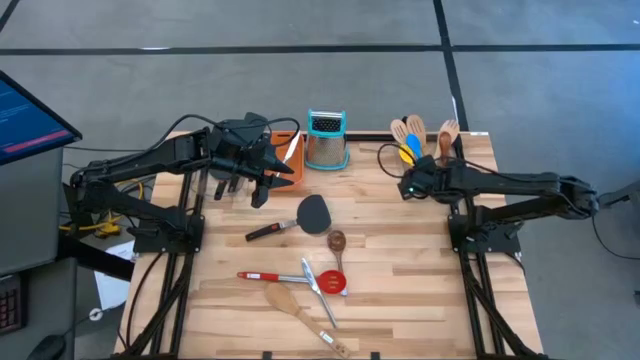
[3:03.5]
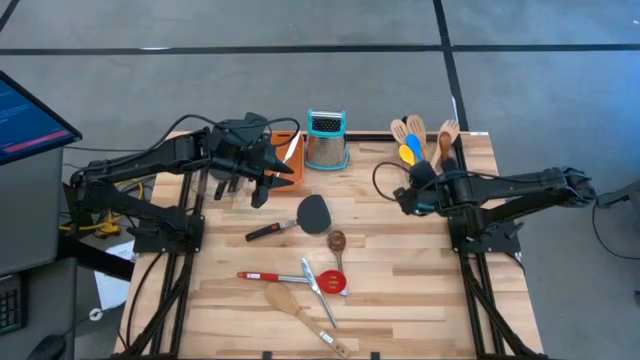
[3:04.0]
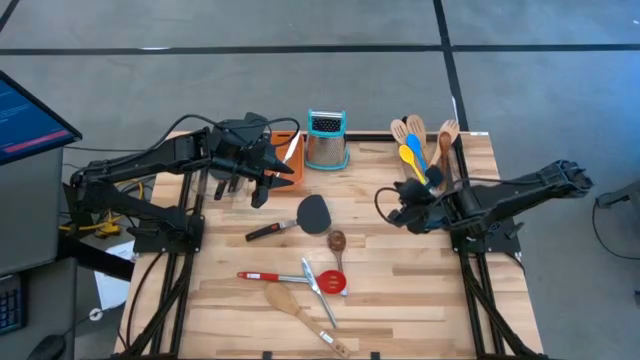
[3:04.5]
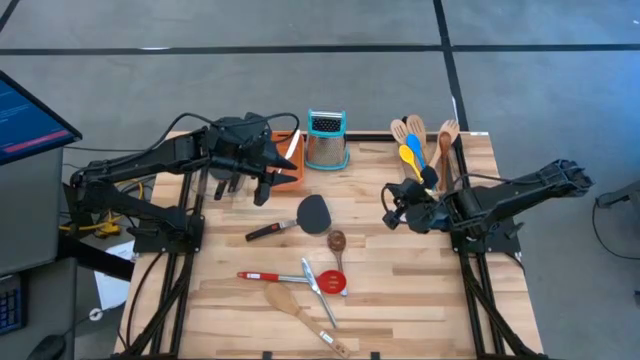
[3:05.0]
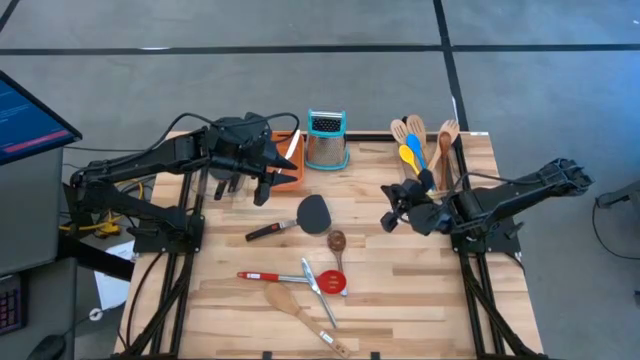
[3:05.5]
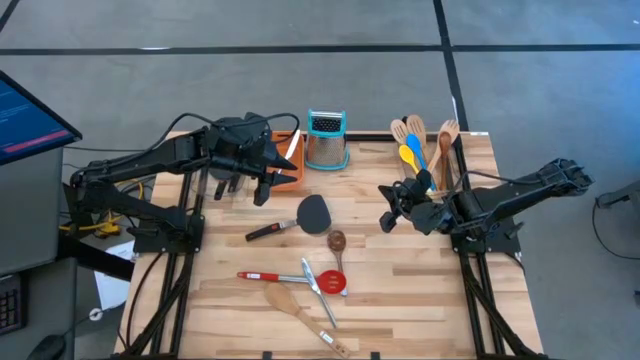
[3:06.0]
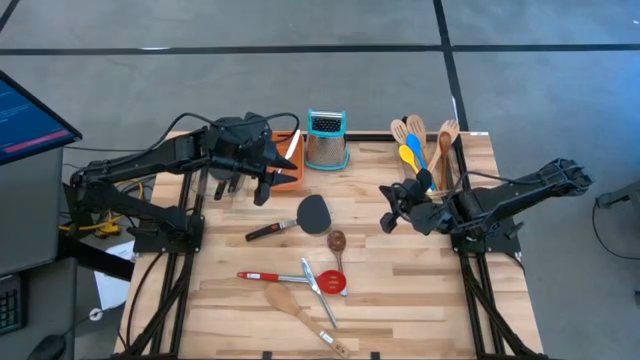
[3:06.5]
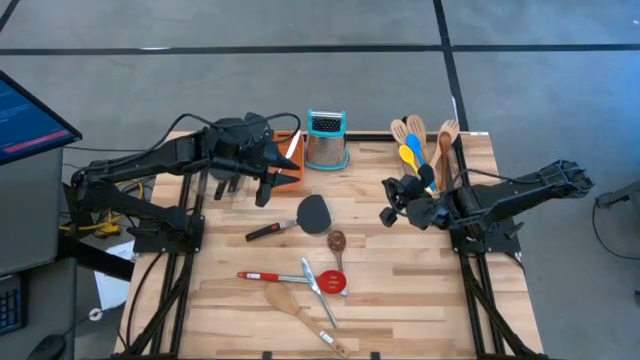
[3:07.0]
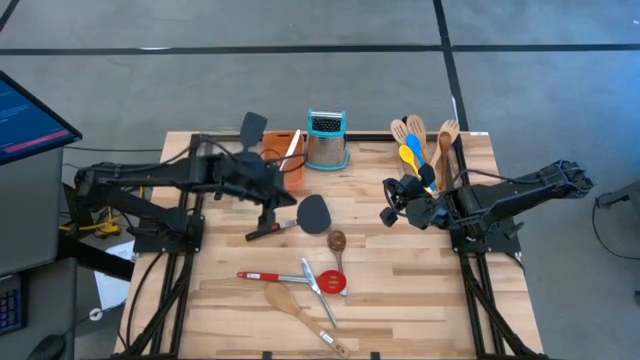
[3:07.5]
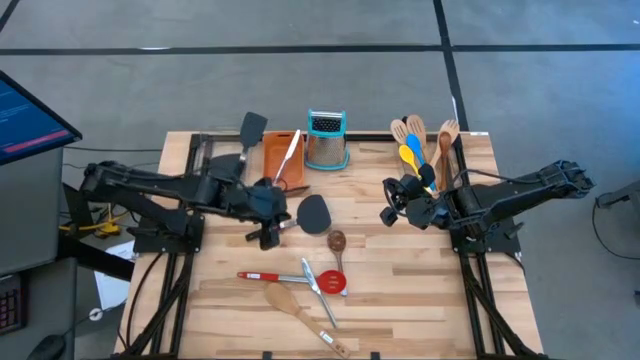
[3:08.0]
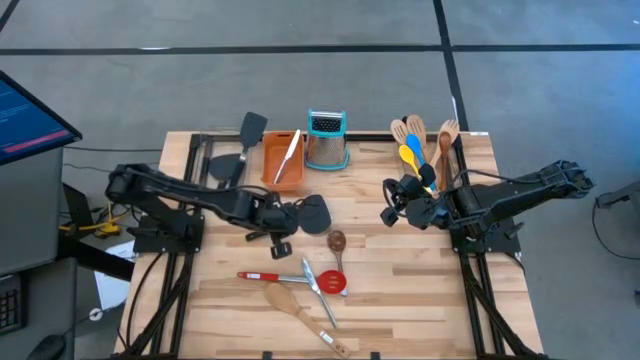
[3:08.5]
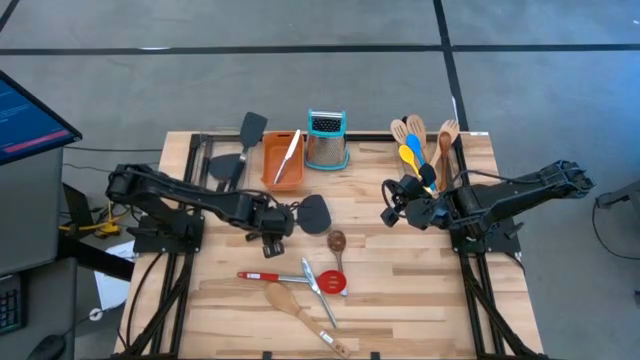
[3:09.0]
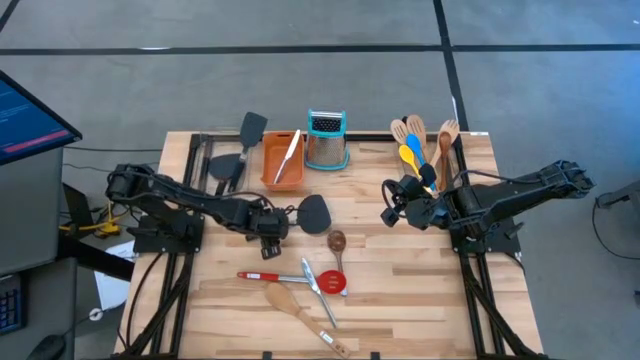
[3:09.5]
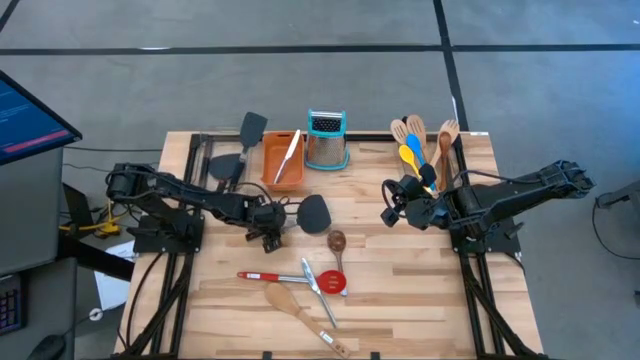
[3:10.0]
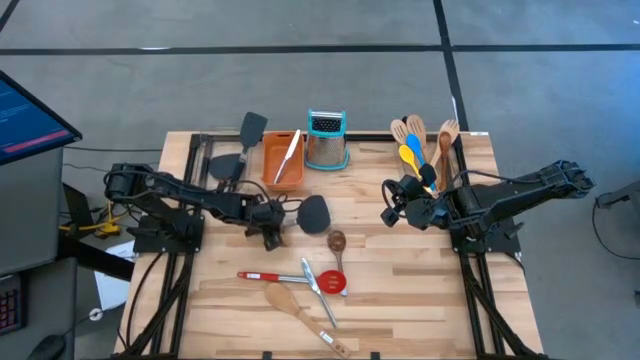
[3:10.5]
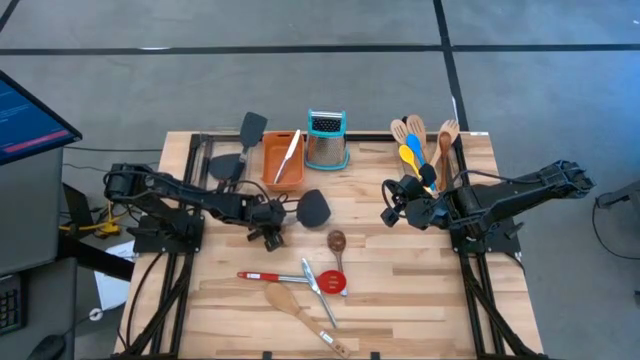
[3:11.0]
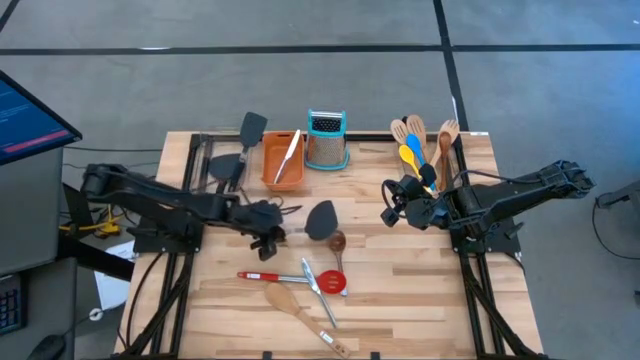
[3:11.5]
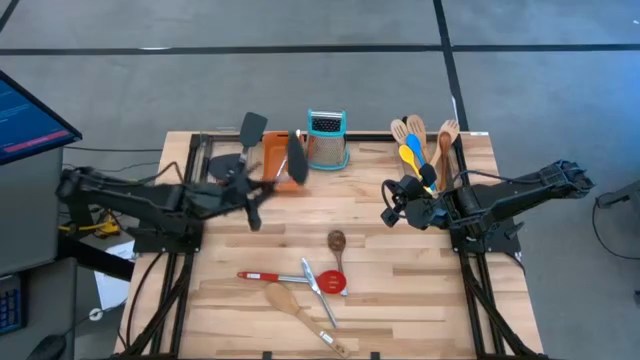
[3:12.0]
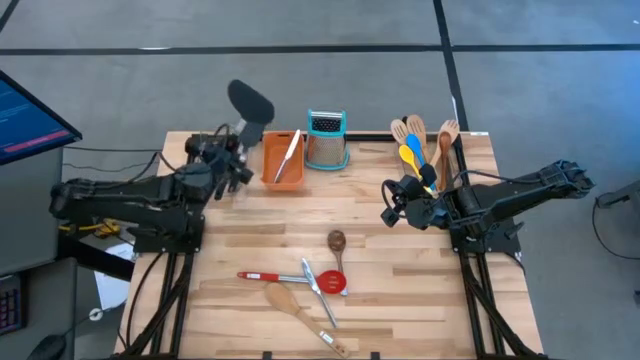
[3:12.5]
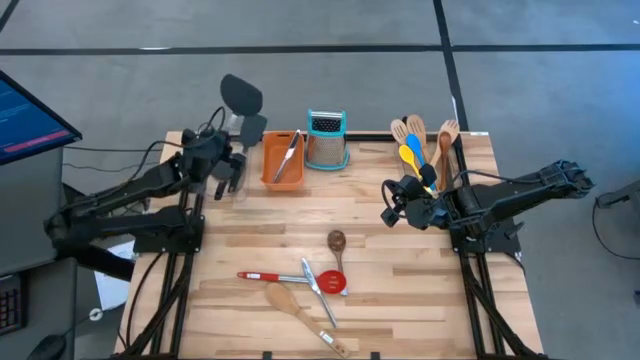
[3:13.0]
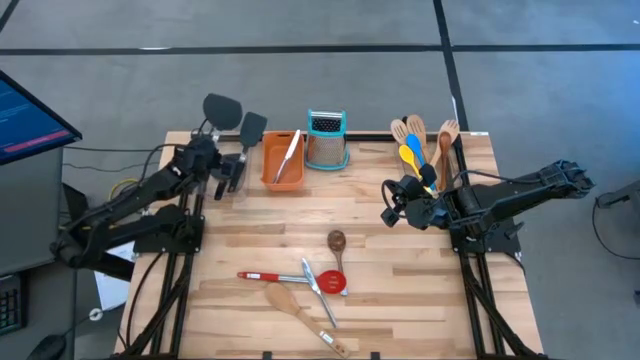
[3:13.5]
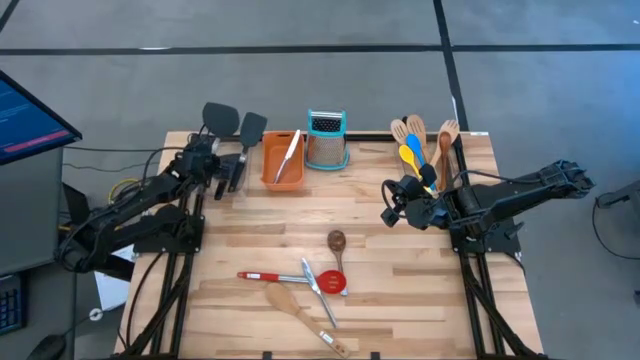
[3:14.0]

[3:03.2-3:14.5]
Task: Pick & Place Kitchen Items
Put the plastic spatula into the left transparent bin

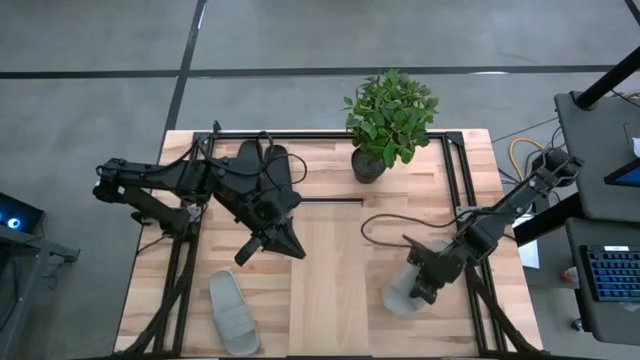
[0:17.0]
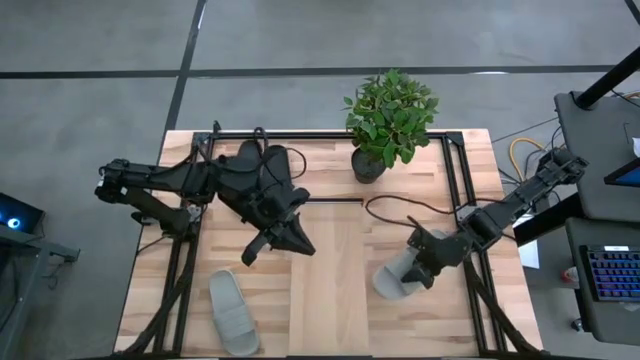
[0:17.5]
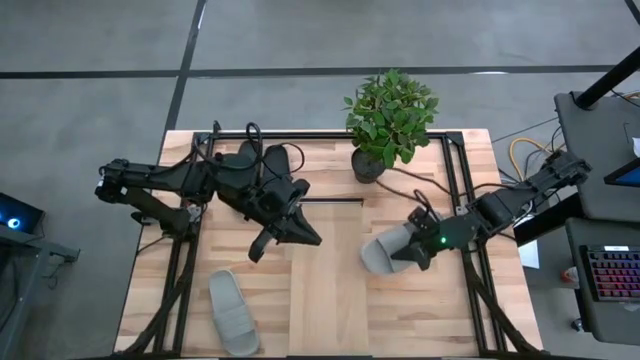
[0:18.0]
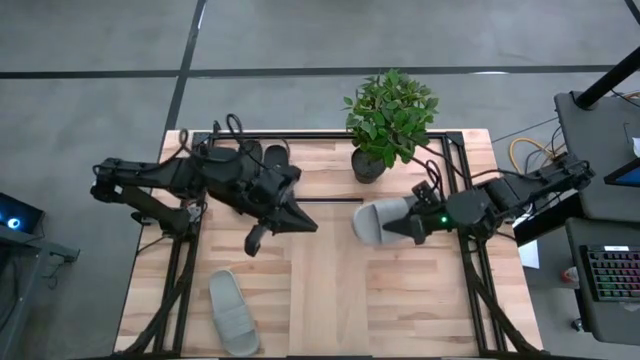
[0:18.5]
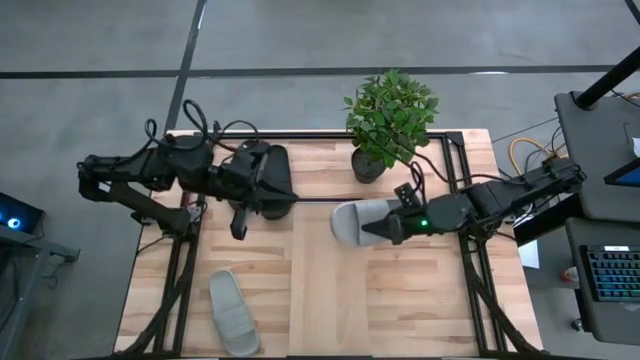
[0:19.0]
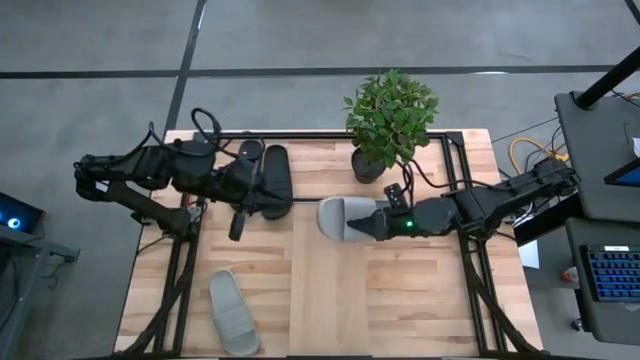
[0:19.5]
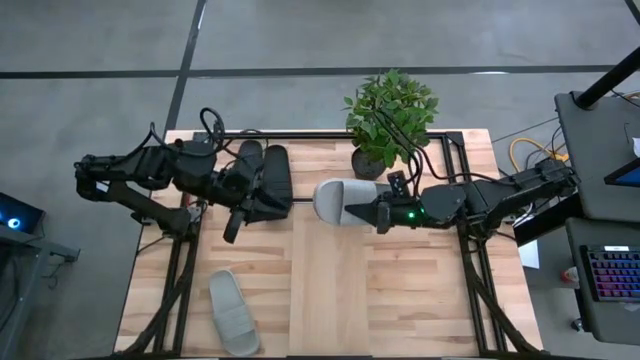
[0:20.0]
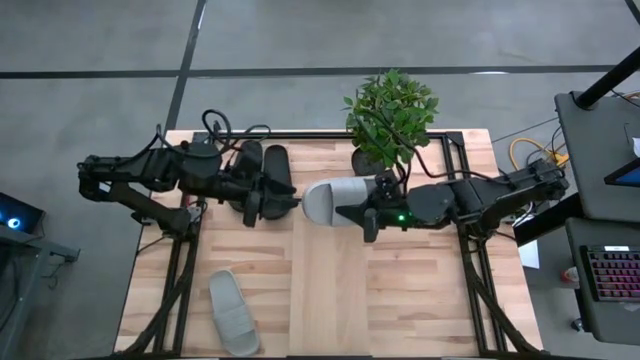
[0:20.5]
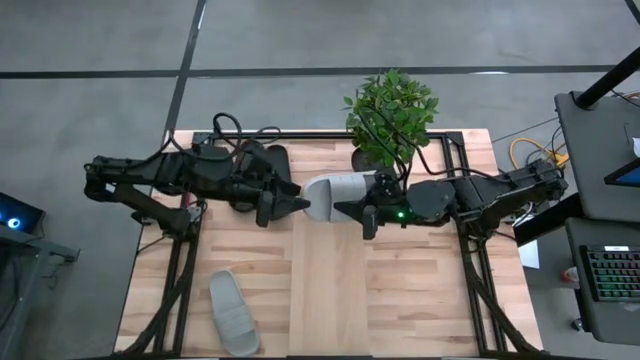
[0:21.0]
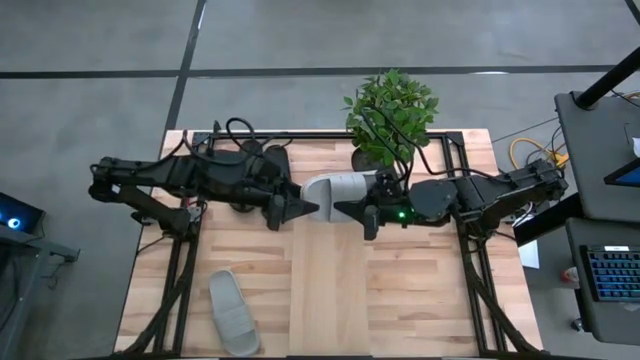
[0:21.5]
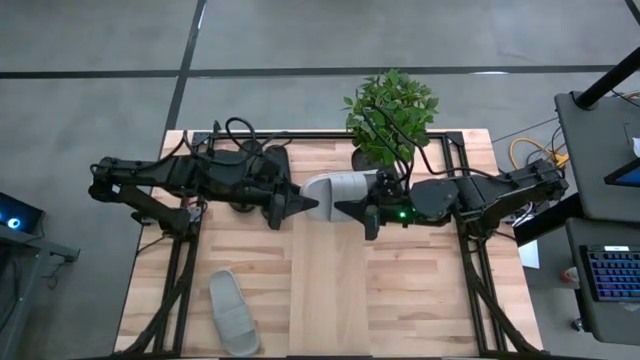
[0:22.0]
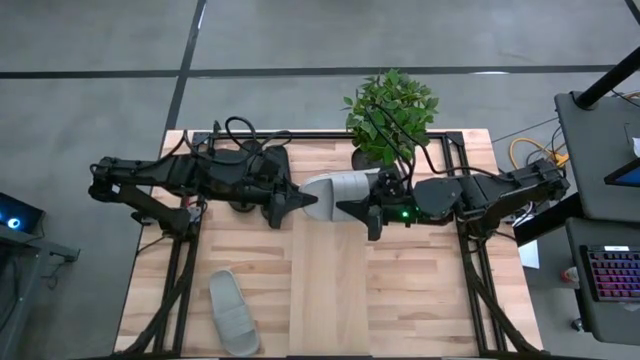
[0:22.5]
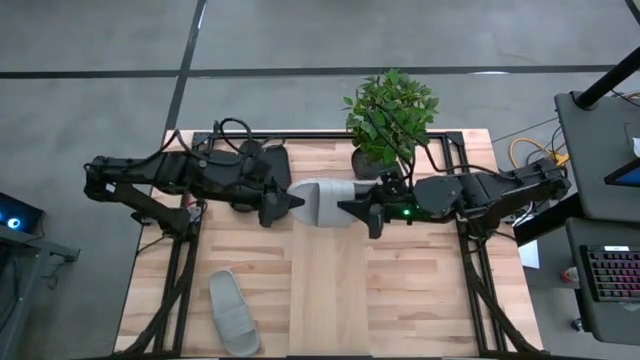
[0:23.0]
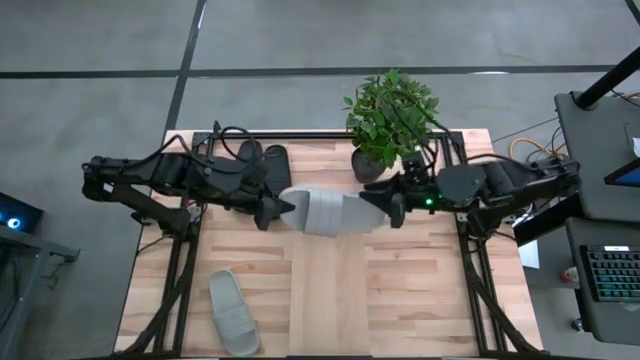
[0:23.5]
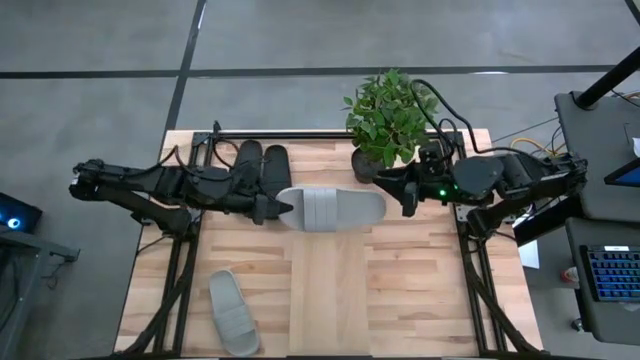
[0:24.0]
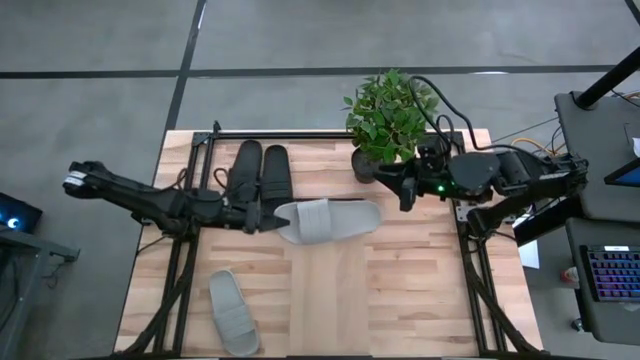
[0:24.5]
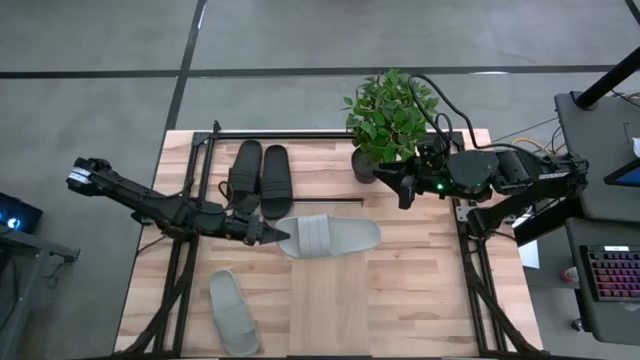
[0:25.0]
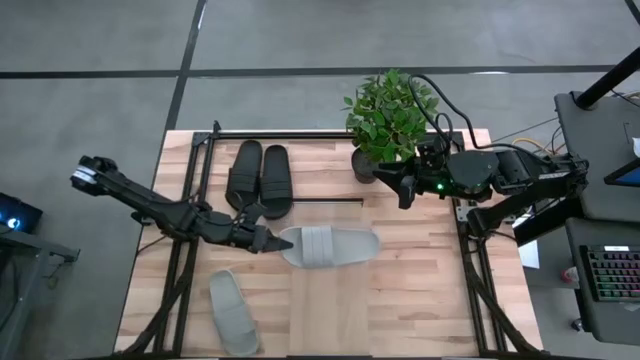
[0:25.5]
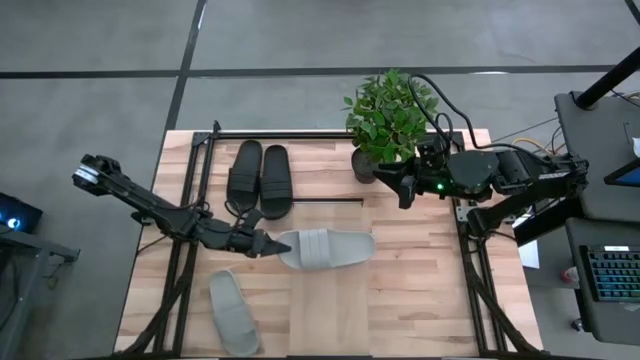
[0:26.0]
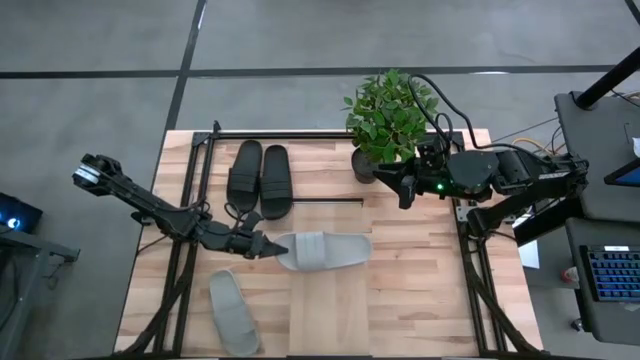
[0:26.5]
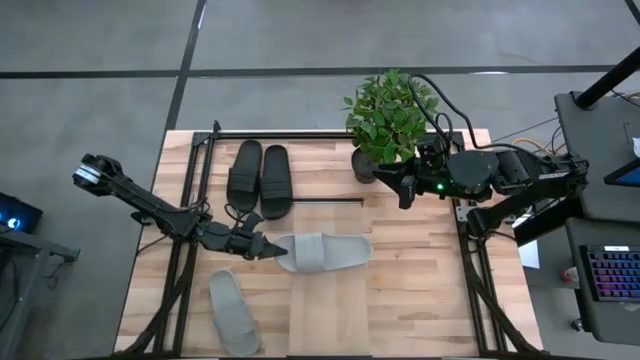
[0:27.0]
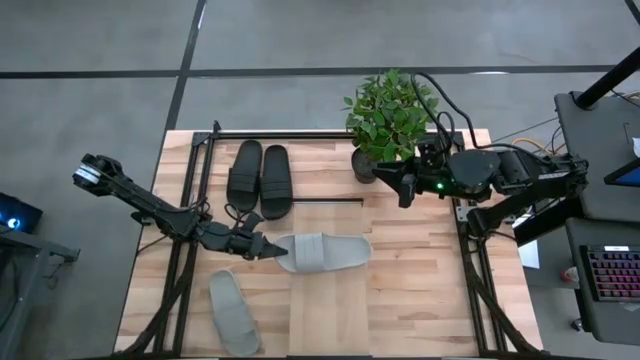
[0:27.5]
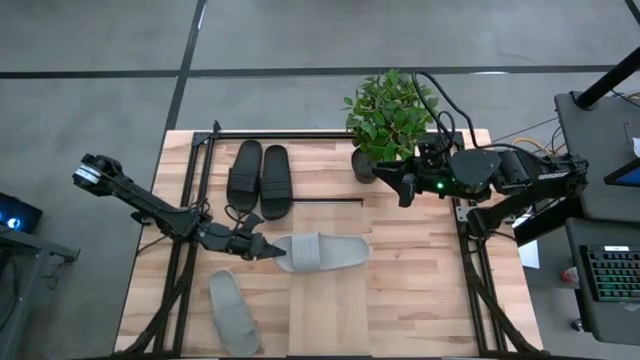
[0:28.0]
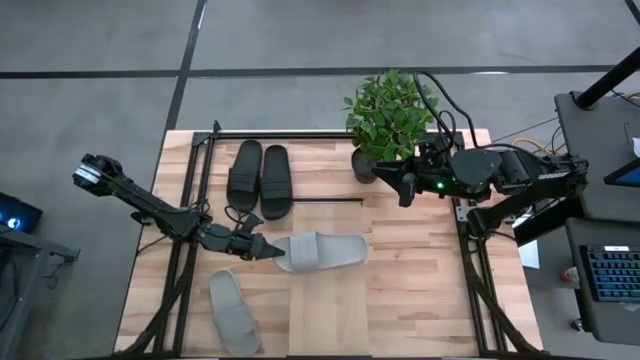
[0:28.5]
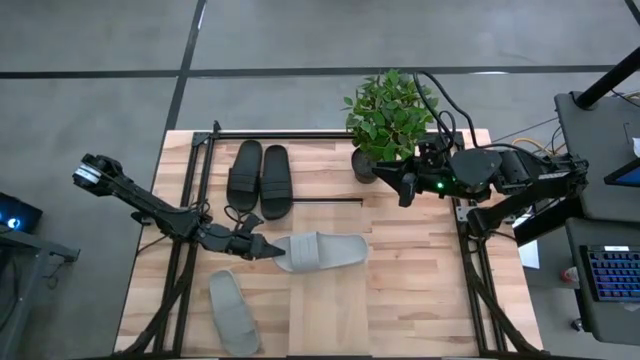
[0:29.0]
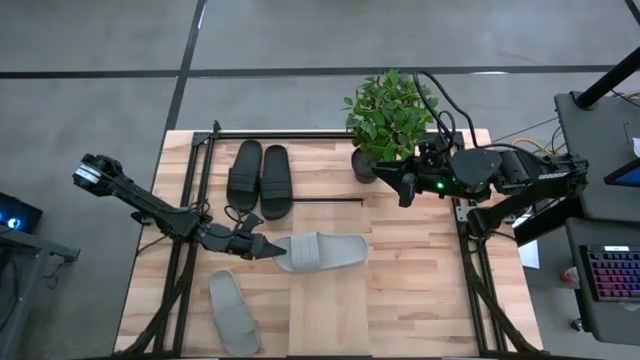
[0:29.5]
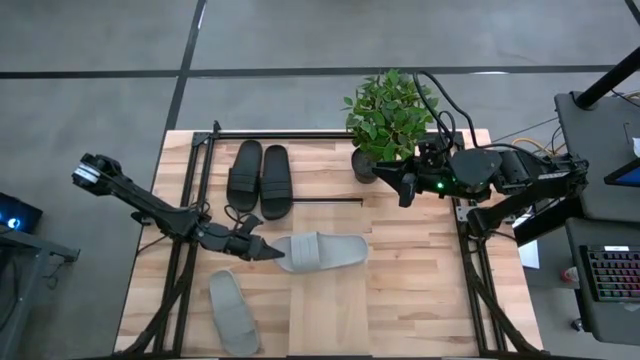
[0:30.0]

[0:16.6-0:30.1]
Task: Pick and place slides into the shelf
Put the right gray slipper on the shelf
